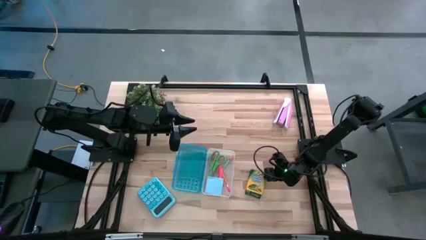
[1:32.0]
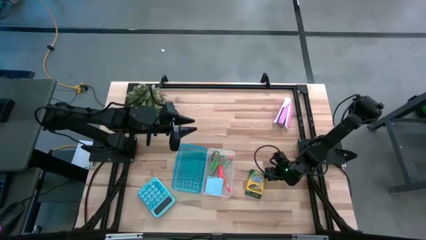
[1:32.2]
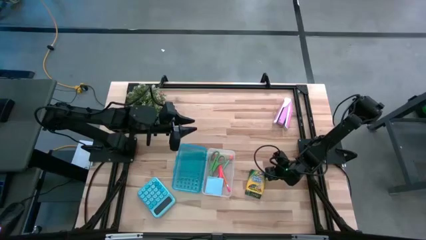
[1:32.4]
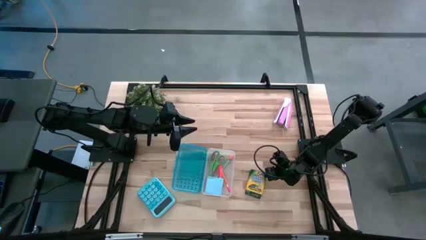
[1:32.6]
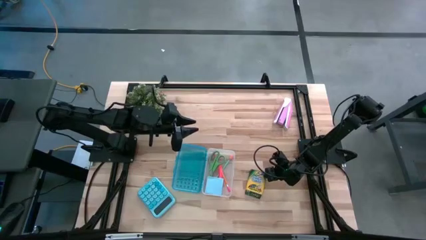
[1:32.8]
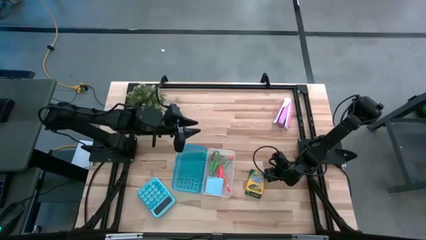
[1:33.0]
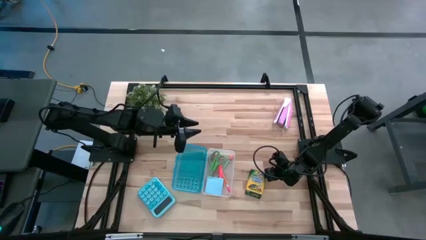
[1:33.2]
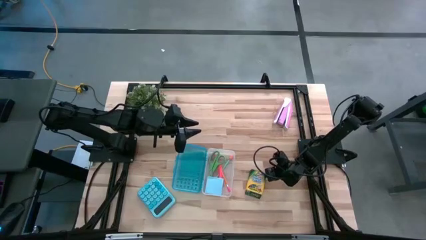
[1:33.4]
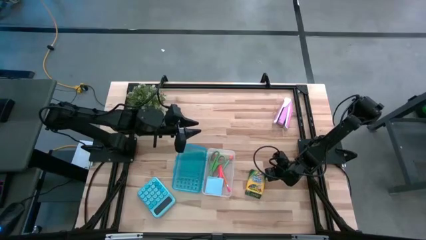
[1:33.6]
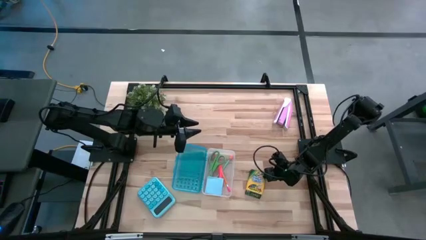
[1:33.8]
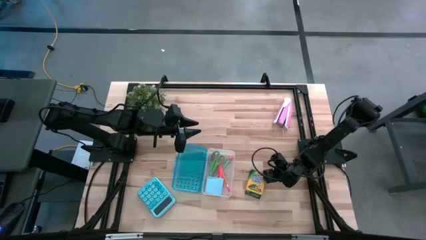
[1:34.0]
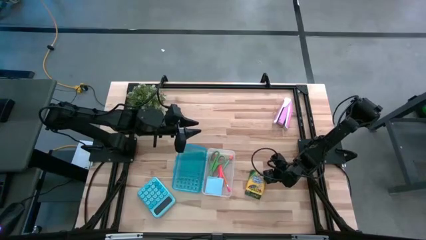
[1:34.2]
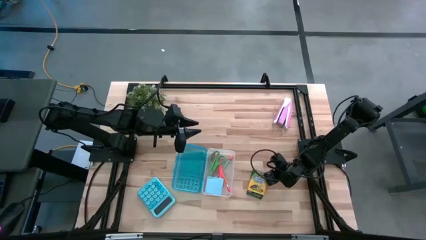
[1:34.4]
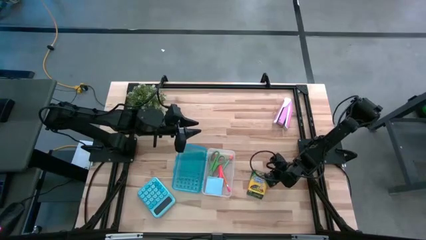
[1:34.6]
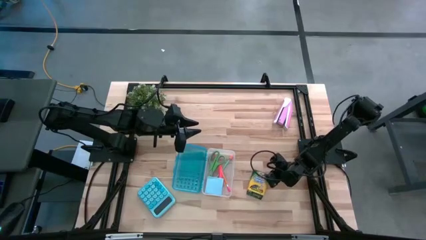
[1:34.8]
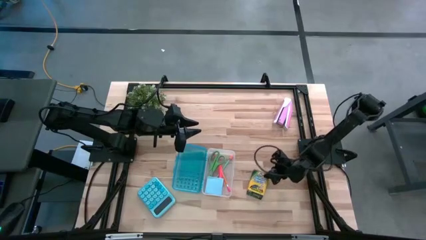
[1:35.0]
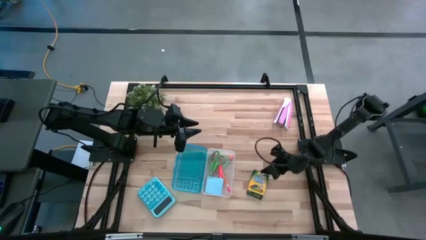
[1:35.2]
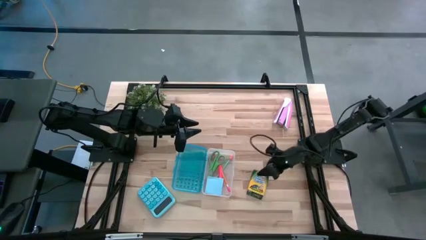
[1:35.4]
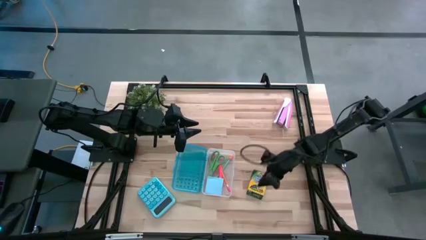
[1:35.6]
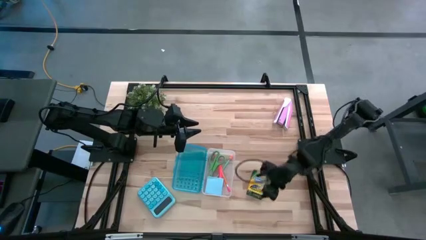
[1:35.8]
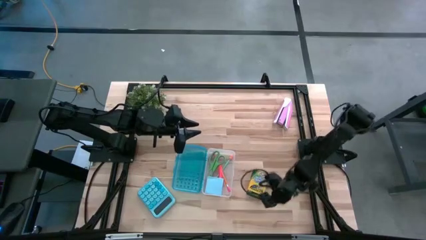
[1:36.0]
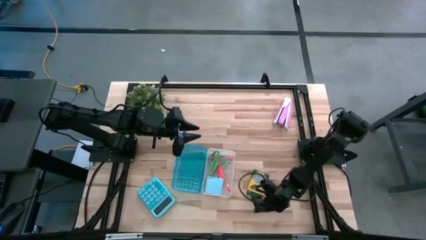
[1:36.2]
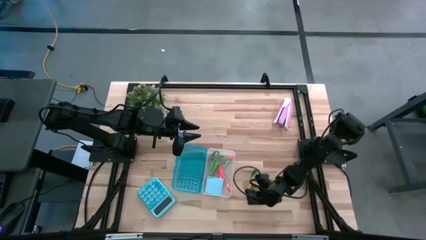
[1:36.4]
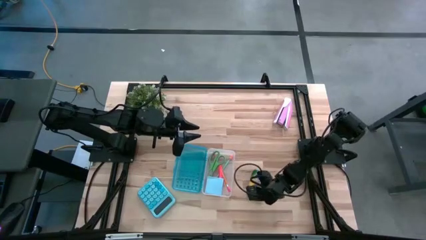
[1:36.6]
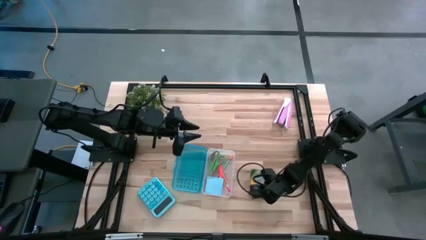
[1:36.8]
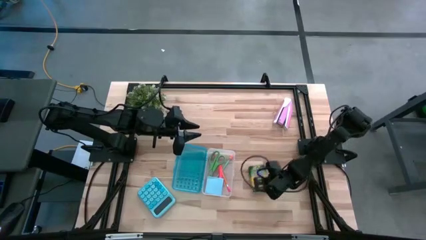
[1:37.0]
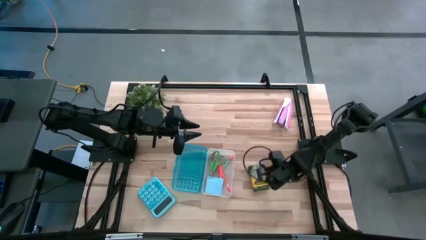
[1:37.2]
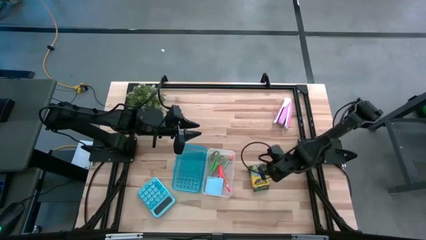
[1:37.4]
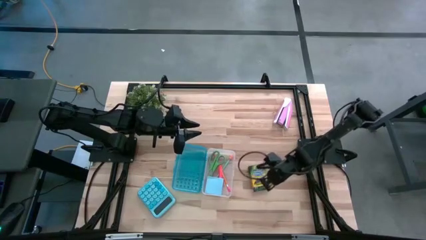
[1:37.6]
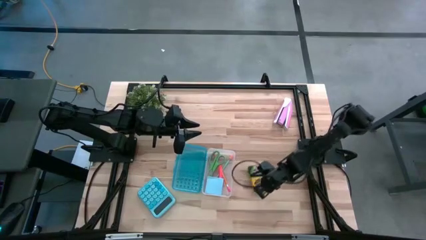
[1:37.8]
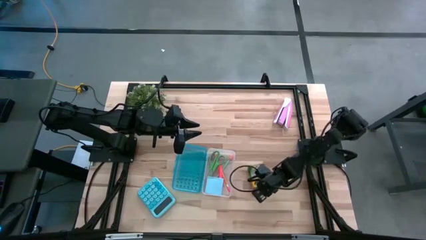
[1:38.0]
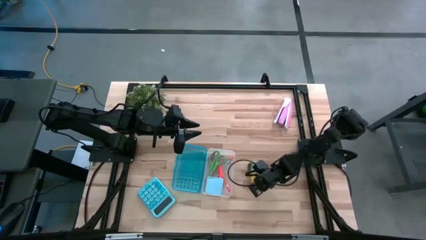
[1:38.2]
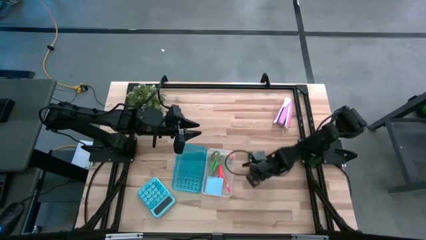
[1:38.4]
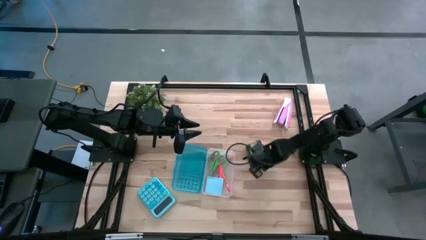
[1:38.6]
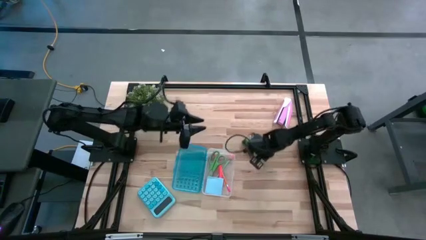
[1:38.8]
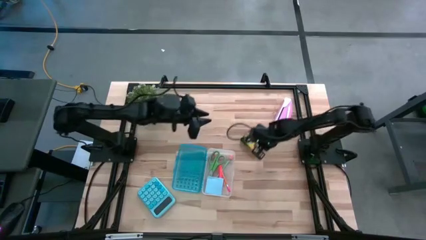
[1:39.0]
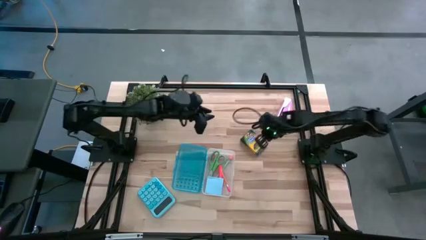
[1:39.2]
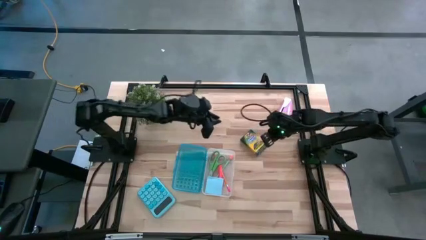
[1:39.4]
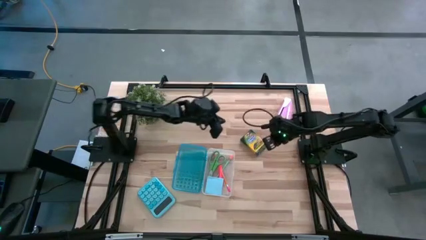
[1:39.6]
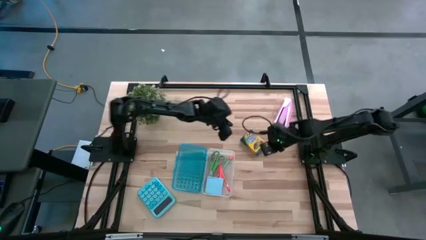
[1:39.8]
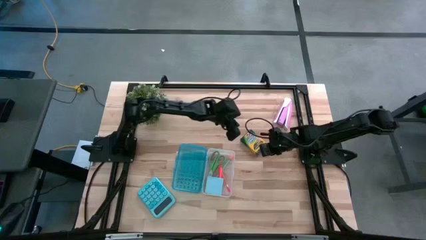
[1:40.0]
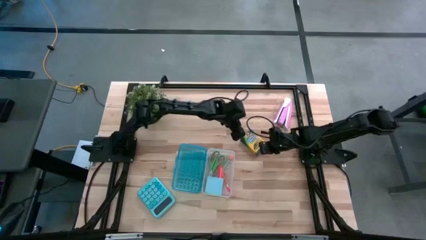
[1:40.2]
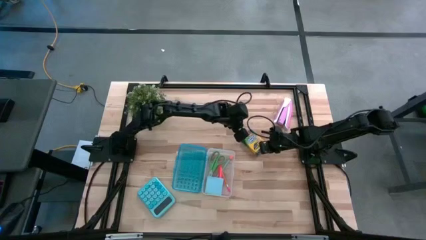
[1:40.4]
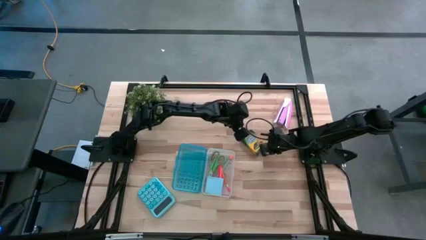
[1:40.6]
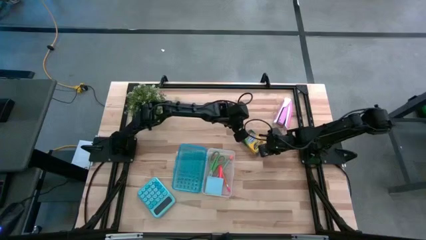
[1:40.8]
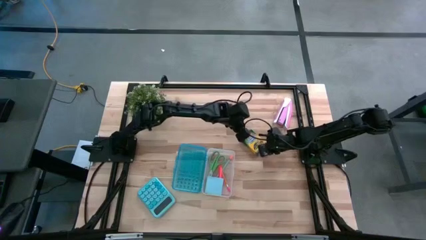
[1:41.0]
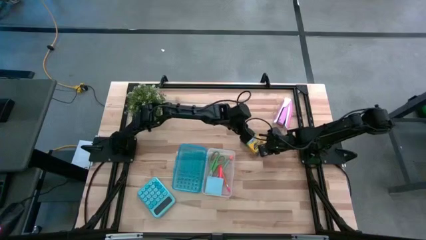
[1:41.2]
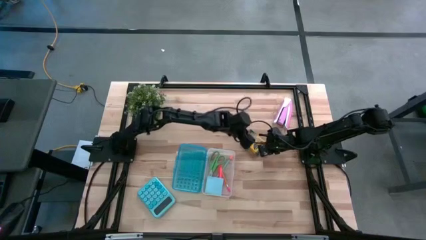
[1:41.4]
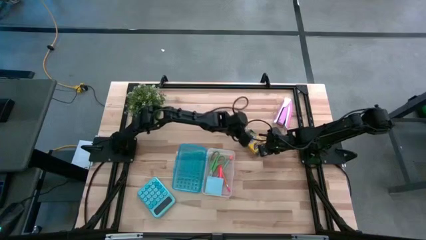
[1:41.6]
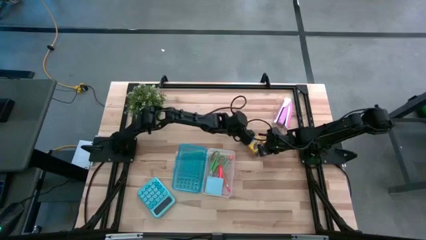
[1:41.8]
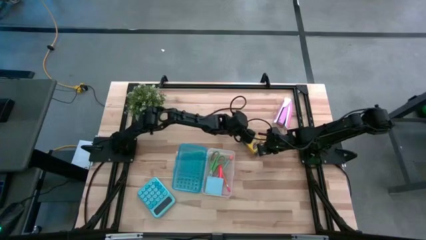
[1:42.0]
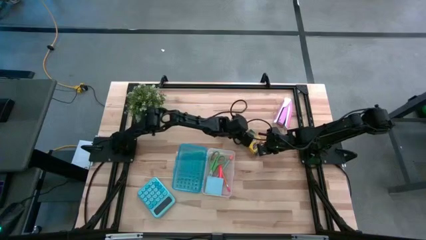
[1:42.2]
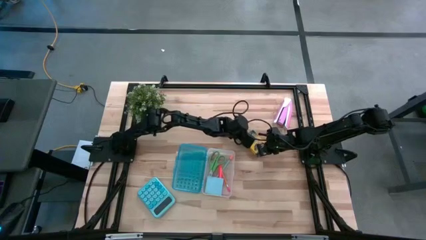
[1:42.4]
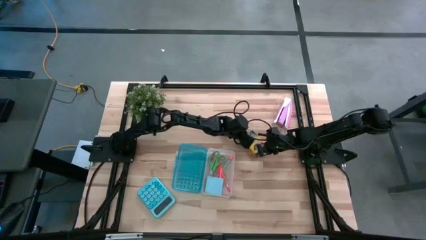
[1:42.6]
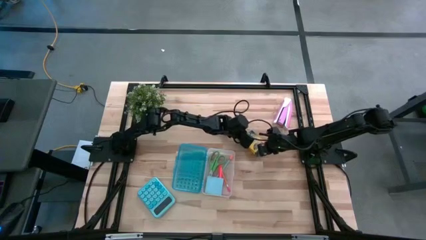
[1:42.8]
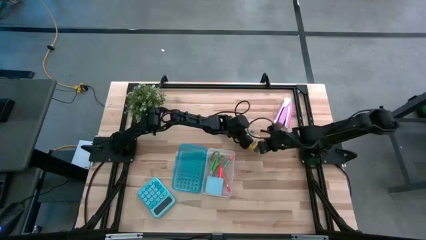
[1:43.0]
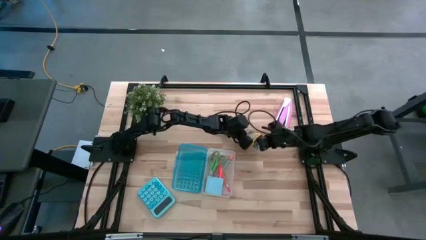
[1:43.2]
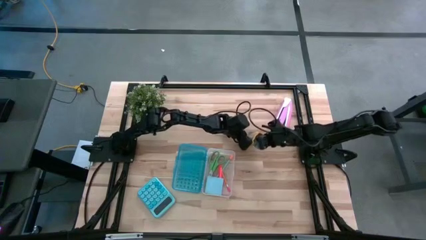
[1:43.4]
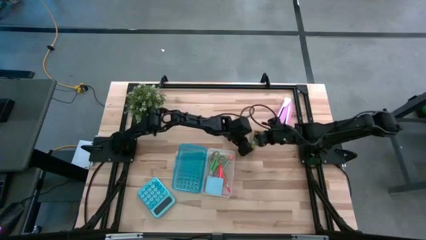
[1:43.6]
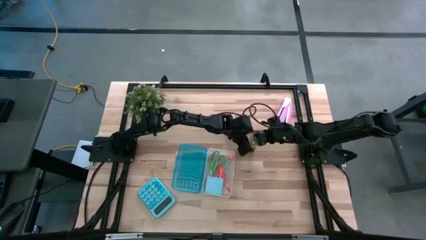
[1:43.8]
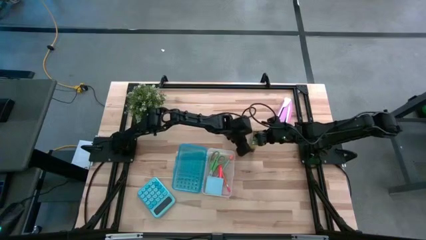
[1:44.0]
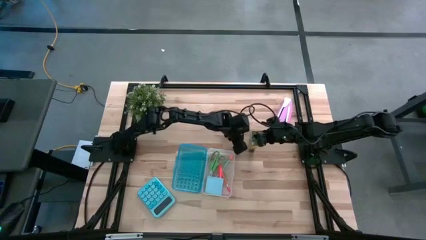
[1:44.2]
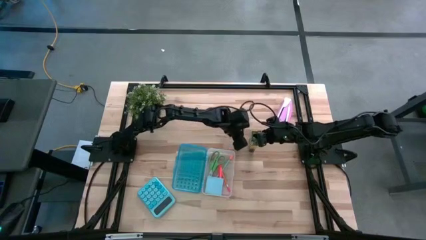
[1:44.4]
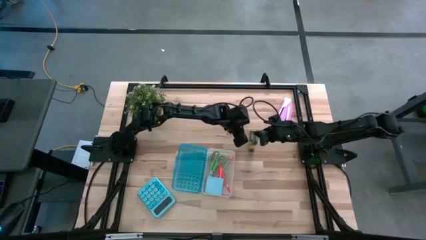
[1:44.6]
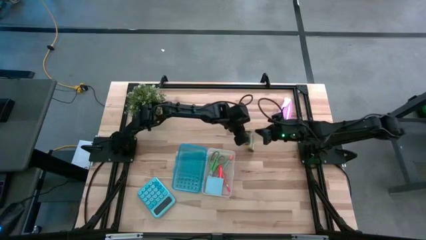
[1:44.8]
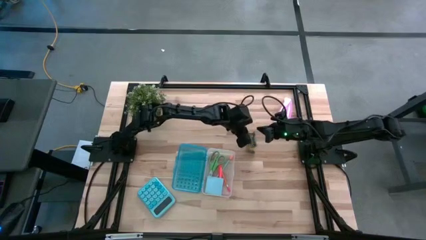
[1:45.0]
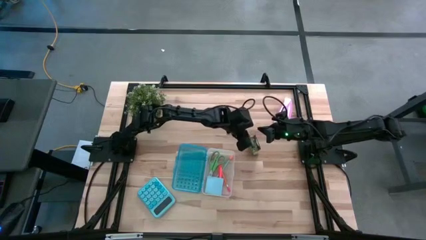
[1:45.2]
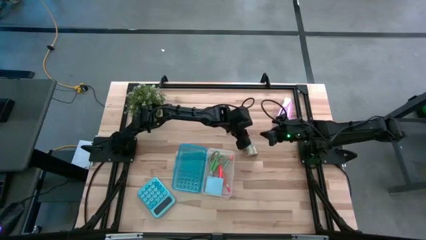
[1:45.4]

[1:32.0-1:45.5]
Task: Pack school essentials
Put the yellow crayon box into the blue supply box

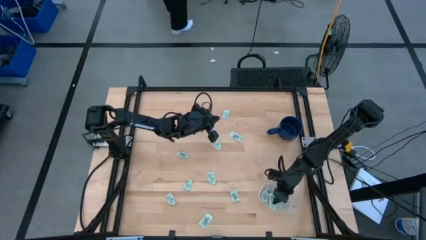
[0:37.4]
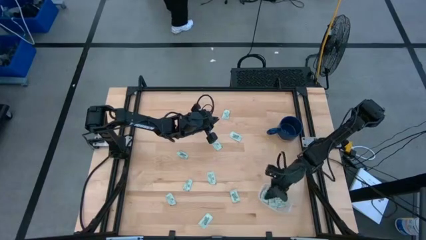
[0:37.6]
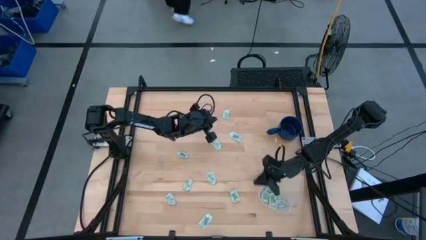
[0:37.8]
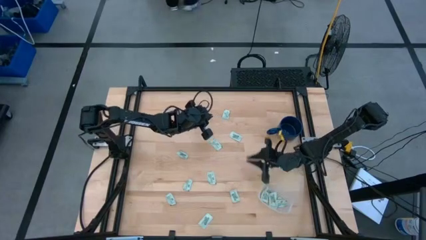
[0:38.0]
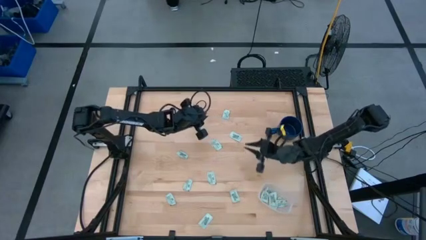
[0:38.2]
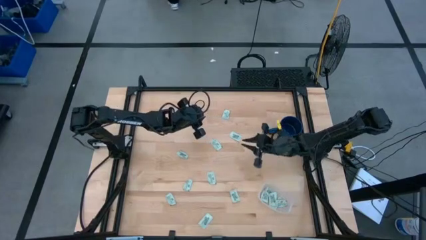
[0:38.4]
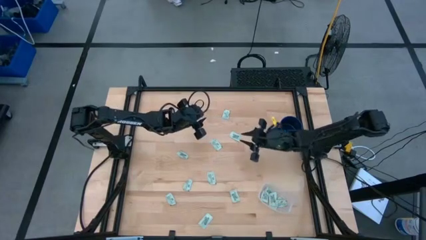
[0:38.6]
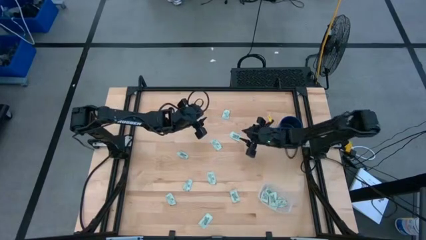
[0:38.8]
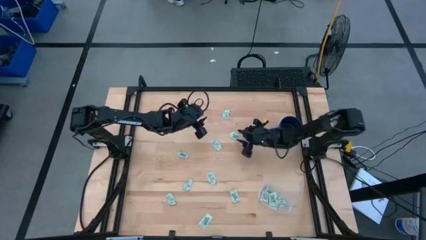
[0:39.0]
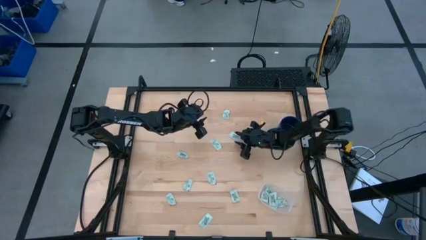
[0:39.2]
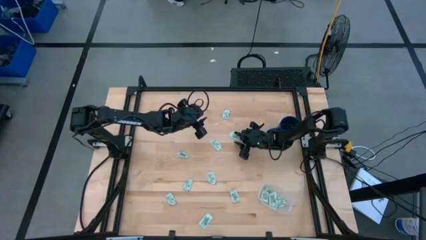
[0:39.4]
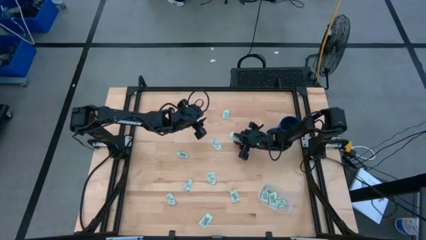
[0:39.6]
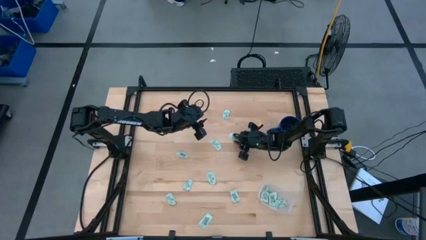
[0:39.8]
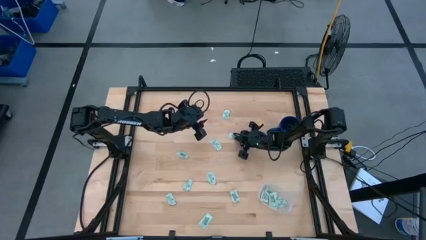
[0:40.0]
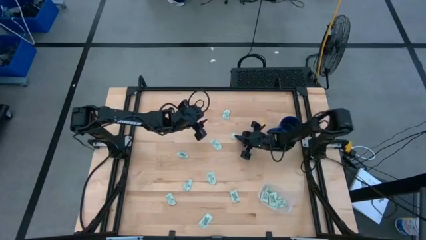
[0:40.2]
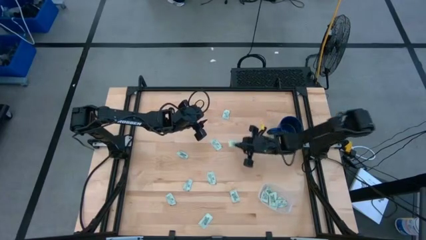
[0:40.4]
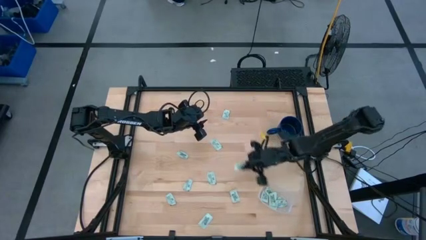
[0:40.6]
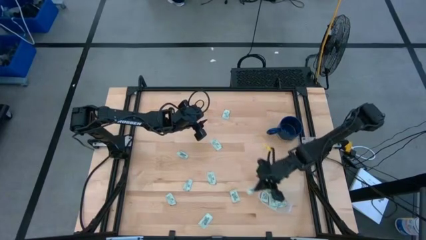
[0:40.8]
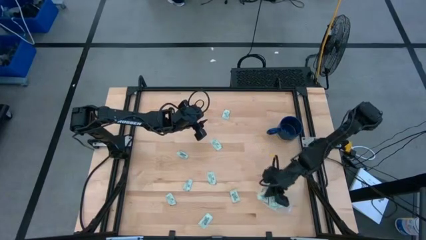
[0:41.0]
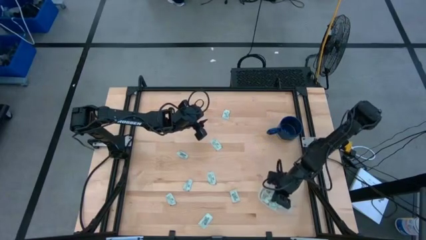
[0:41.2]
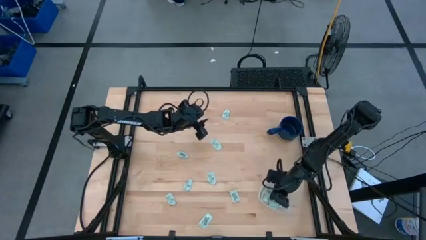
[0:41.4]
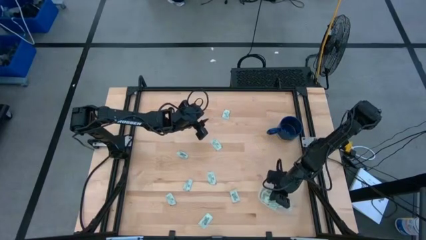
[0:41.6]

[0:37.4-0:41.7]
Task: Pick and place Stevia / Truvia into bins
Put the stevia packet into the transparent container
